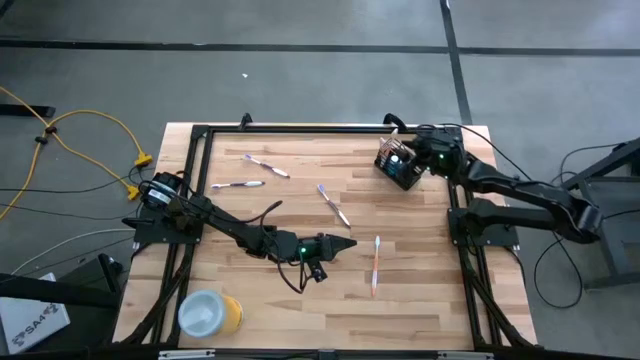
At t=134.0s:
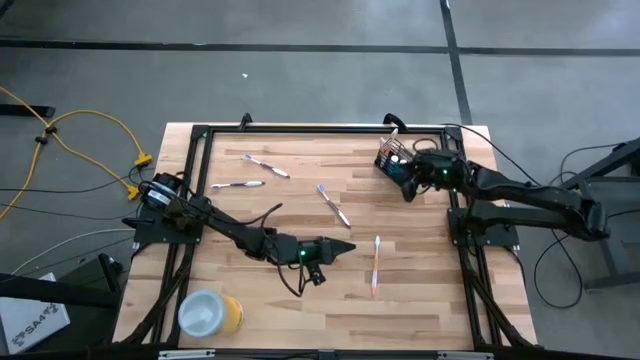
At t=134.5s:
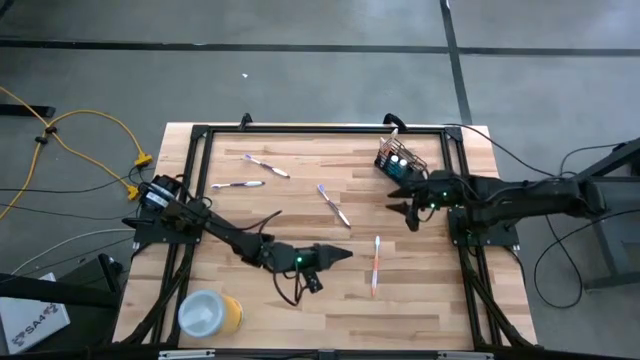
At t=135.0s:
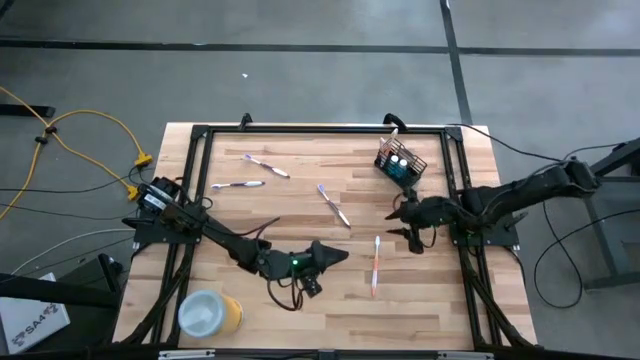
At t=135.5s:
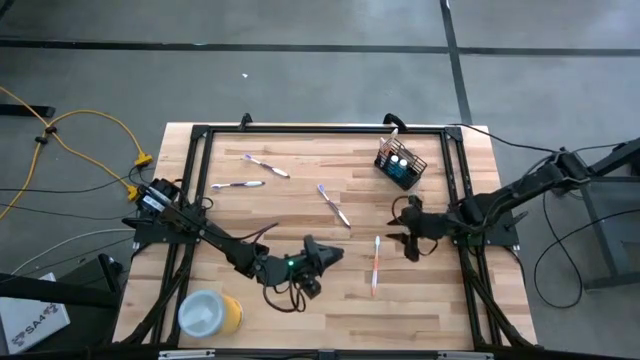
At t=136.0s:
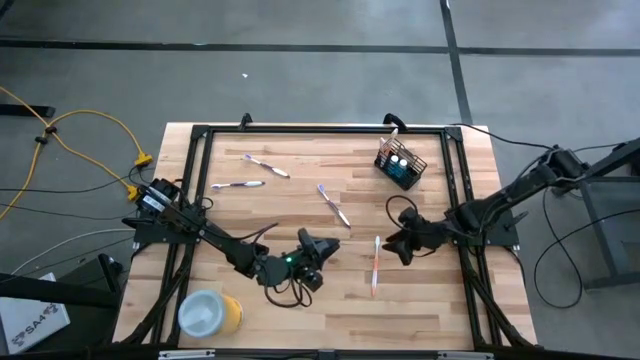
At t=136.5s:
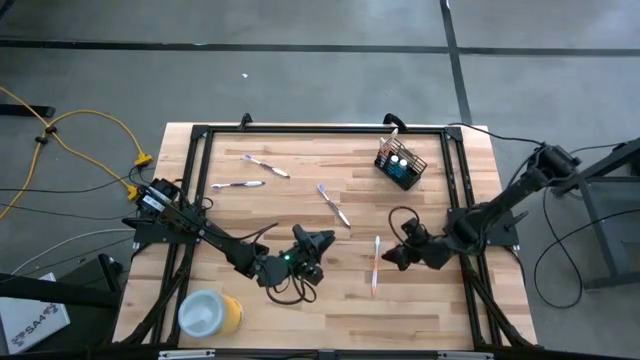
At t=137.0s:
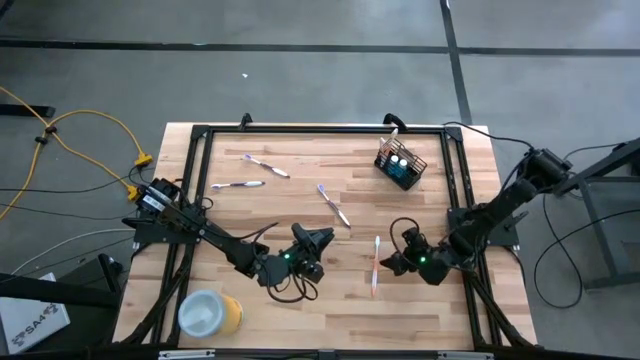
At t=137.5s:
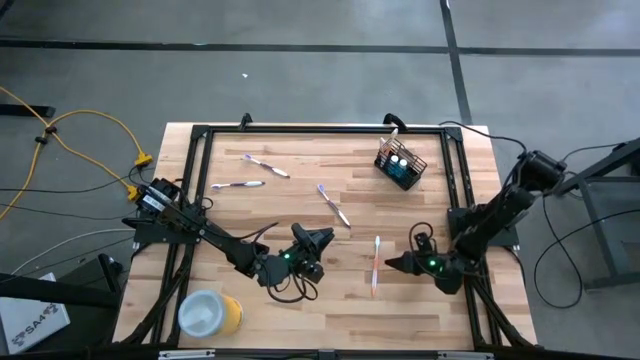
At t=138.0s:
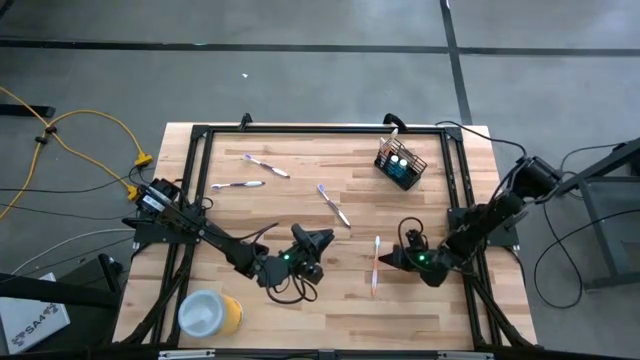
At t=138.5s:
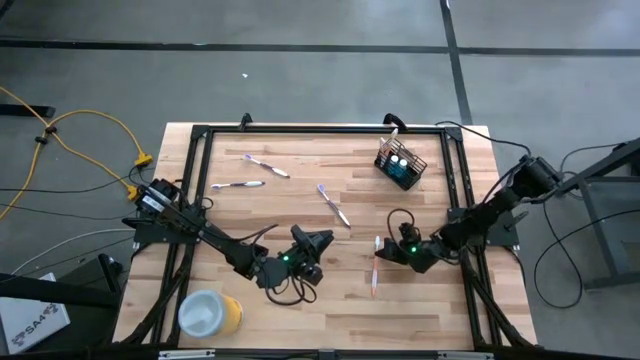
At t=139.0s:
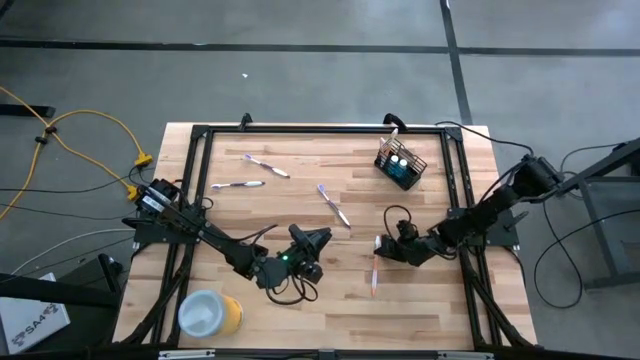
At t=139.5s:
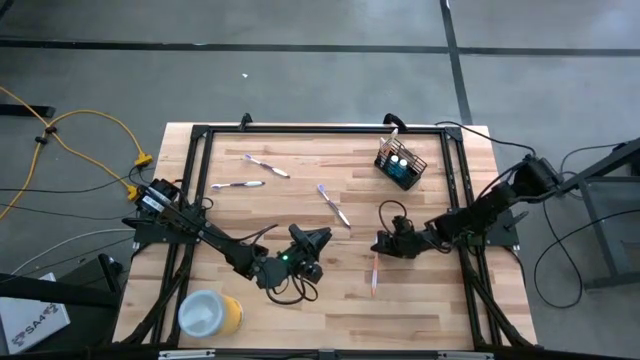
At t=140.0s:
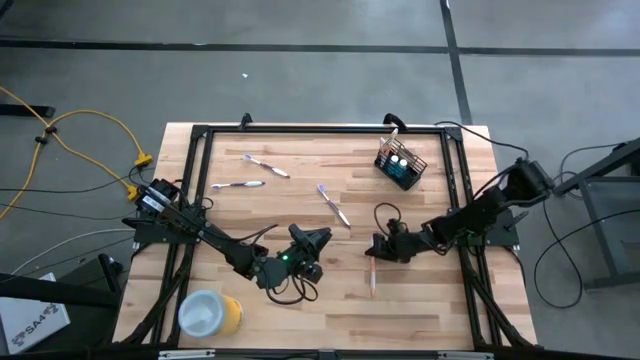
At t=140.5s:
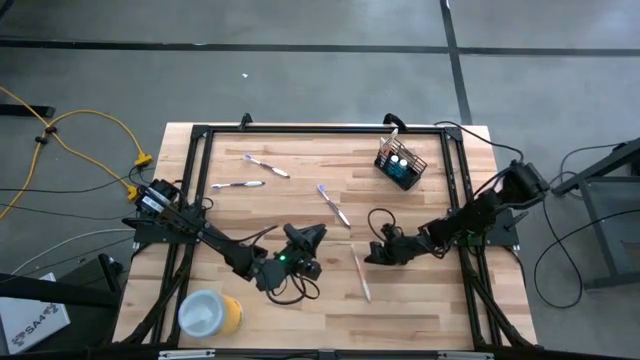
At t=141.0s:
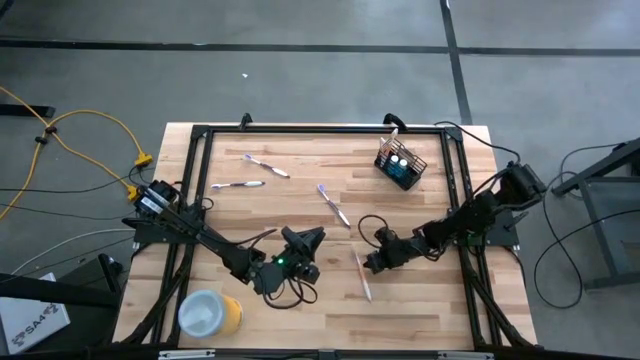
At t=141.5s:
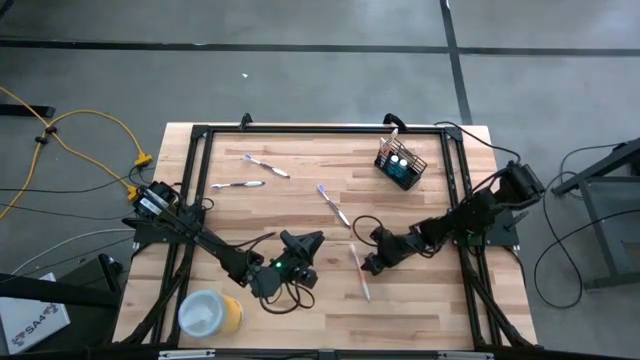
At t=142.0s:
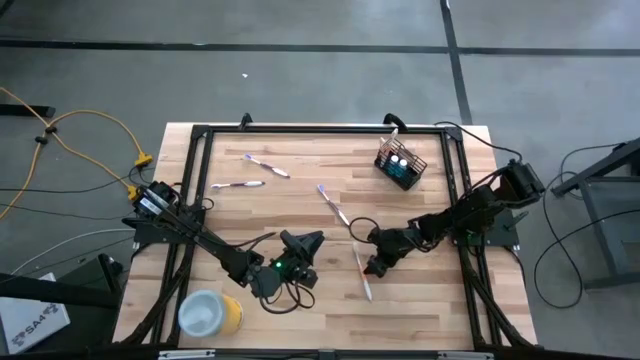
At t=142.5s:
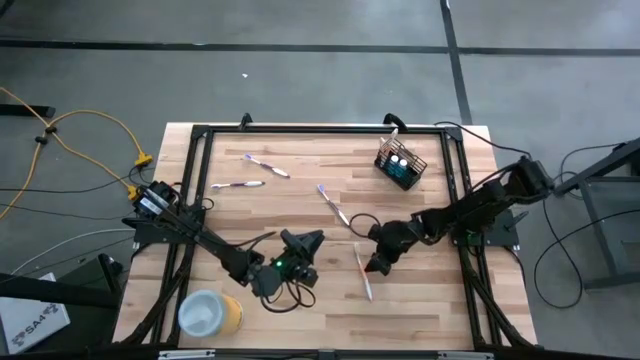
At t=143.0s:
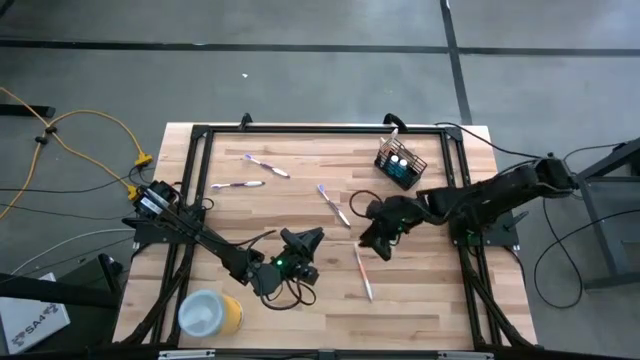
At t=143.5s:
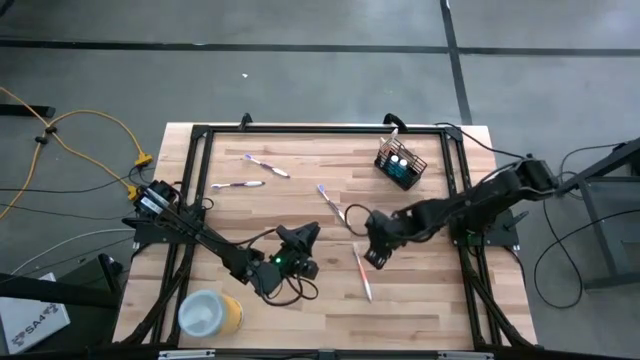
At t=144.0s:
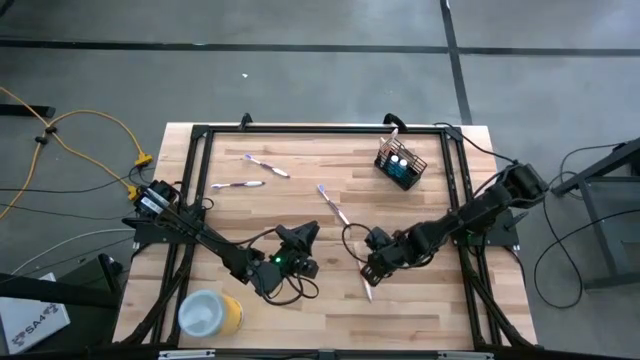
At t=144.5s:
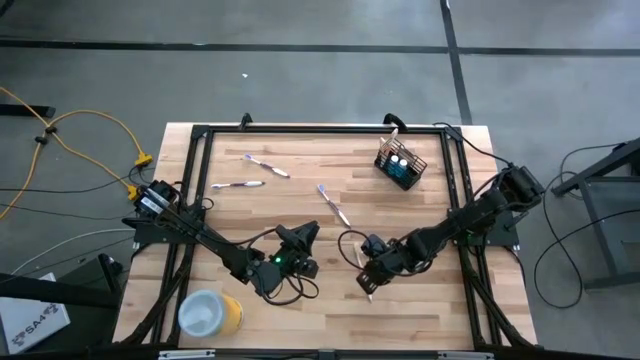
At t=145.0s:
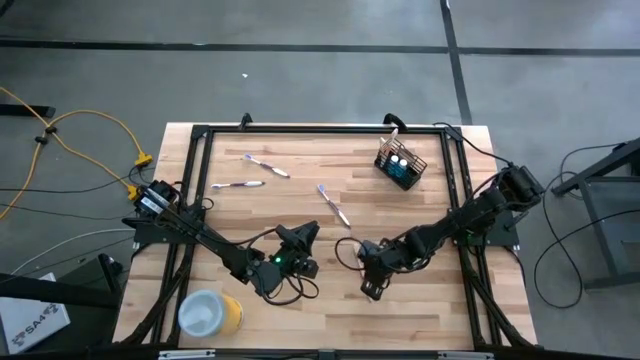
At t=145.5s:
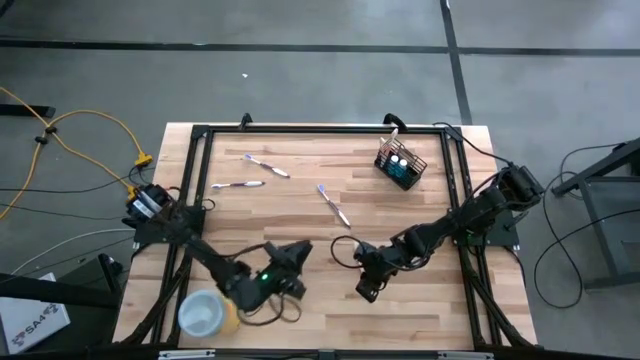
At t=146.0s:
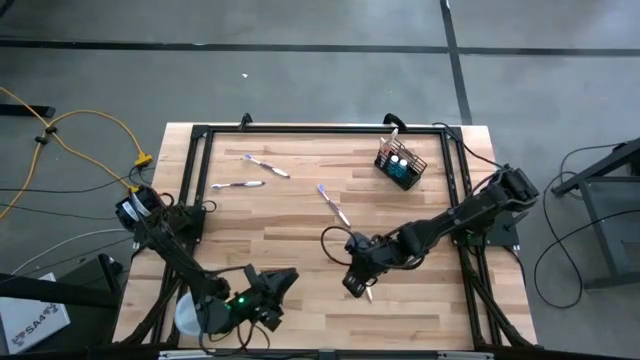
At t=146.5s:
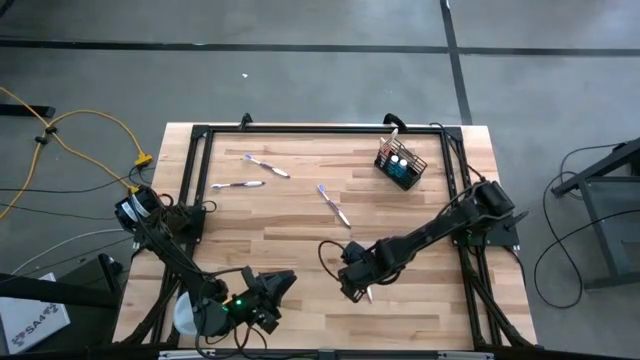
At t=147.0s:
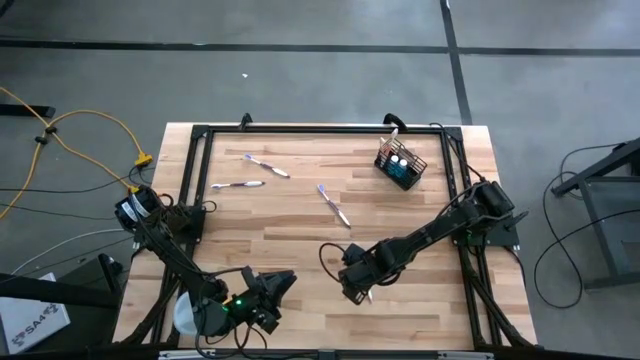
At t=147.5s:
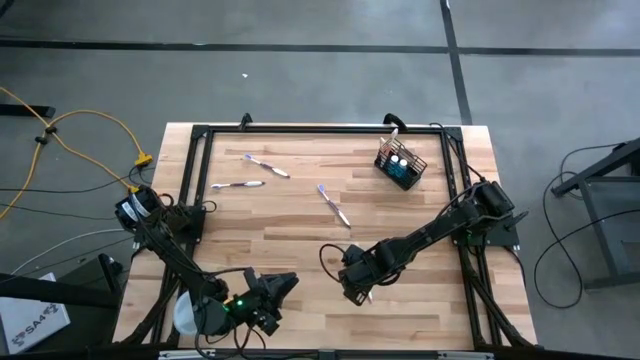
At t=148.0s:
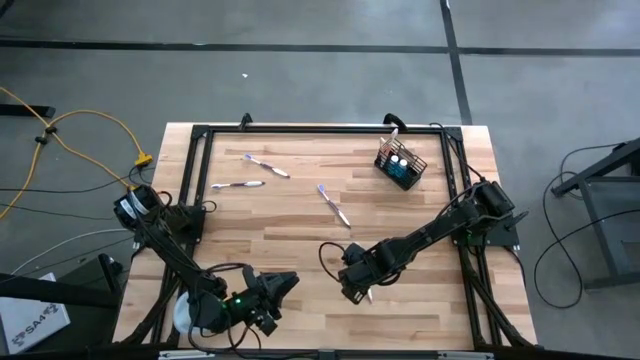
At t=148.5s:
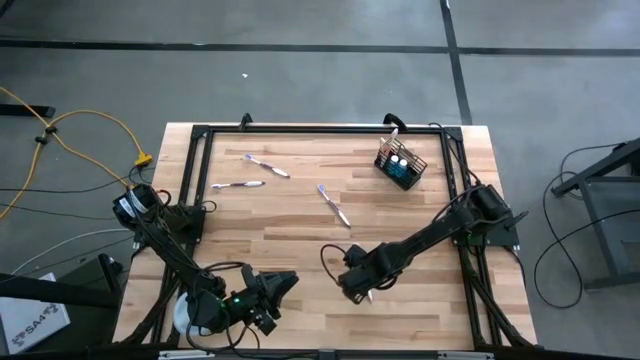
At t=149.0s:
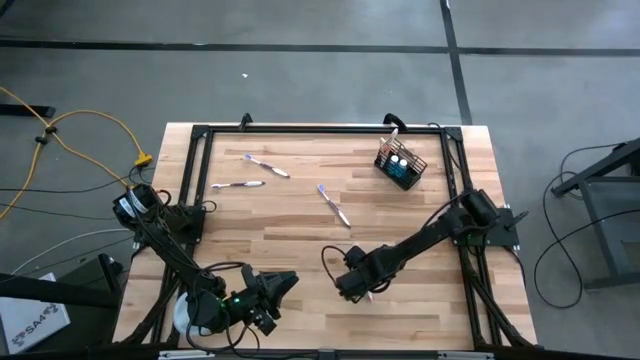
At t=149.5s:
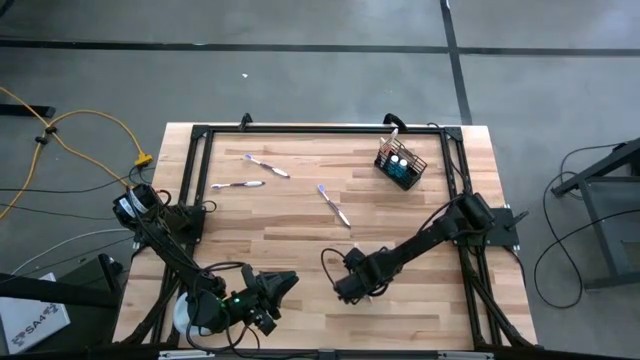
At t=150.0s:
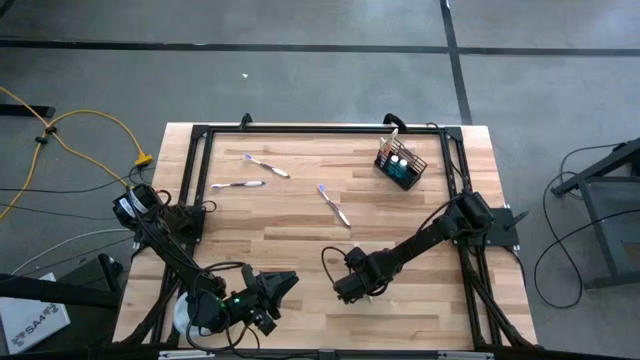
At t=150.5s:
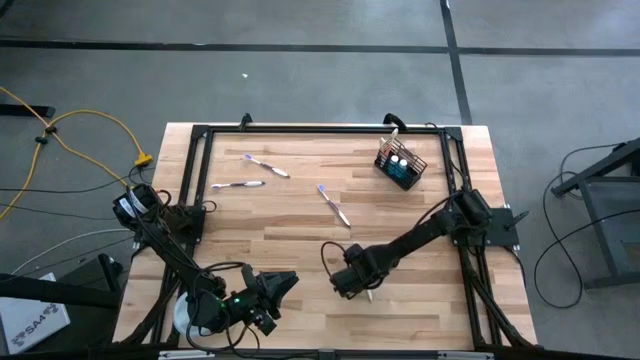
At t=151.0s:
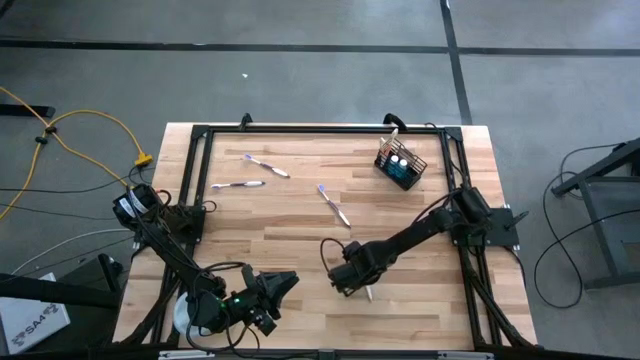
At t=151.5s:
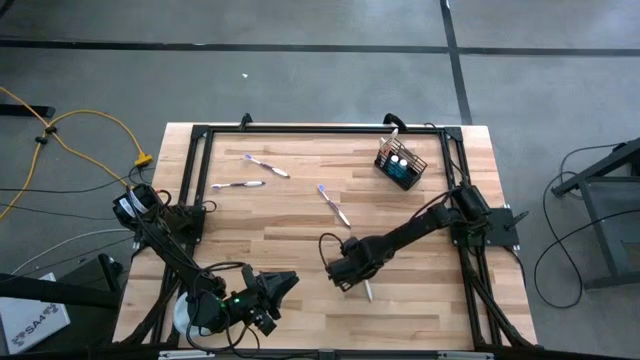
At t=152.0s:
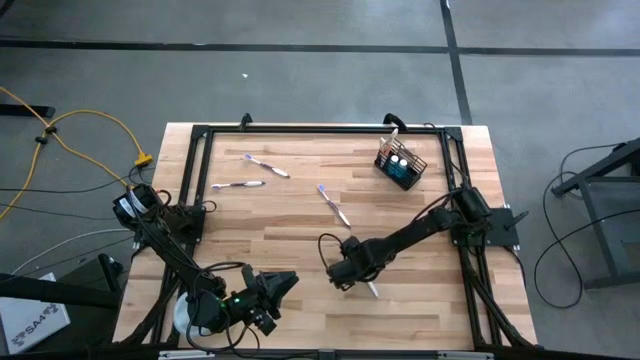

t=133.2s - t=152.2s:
Task: Pick & Place toothbrushing station
Put the orange toothbrush into the left of the black mesh organizer
